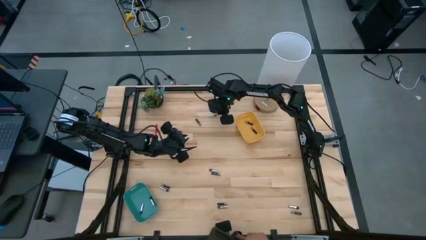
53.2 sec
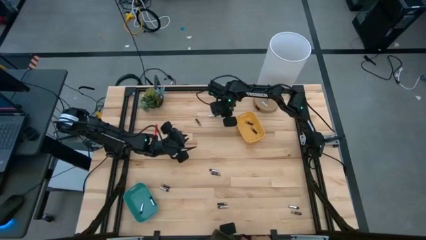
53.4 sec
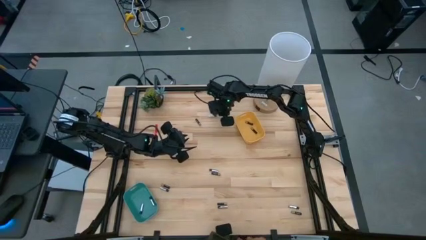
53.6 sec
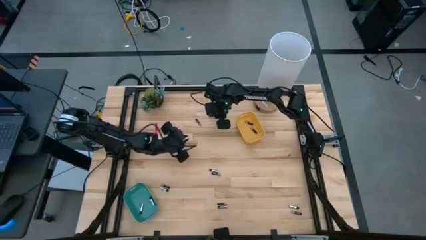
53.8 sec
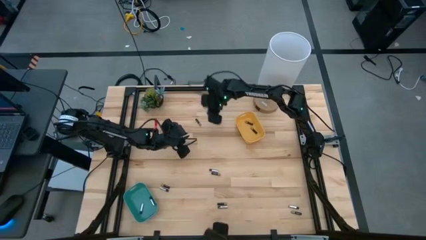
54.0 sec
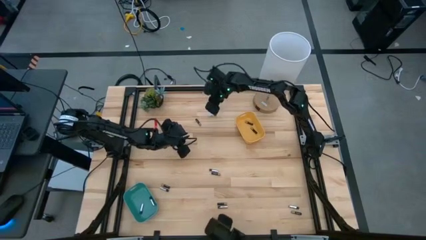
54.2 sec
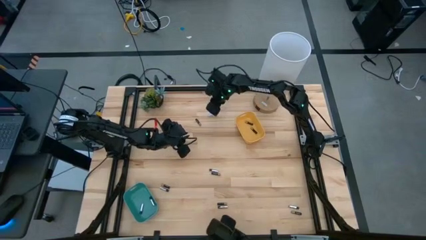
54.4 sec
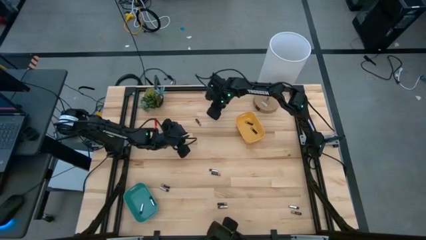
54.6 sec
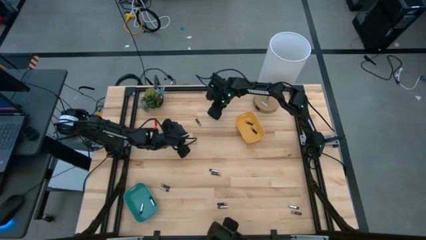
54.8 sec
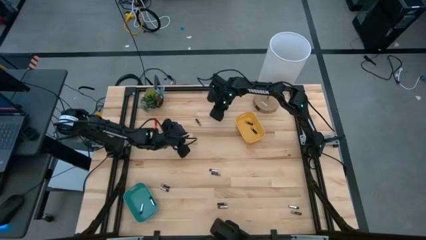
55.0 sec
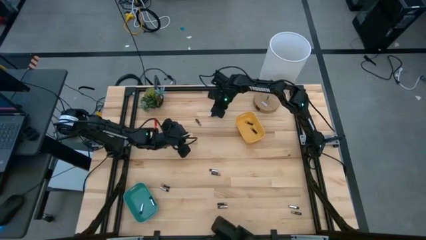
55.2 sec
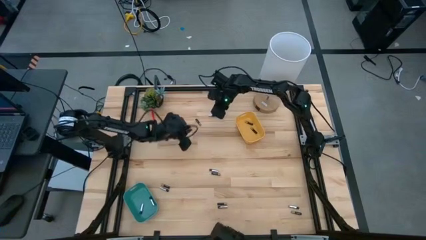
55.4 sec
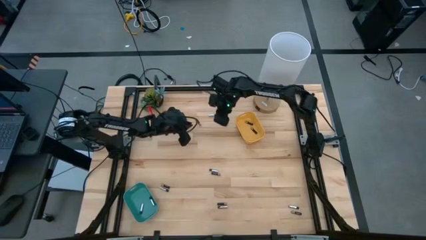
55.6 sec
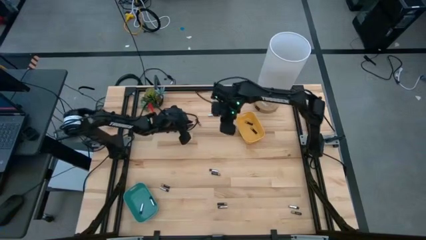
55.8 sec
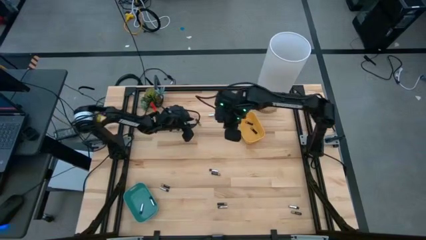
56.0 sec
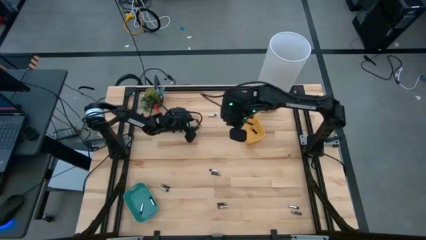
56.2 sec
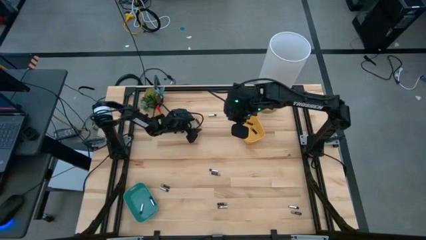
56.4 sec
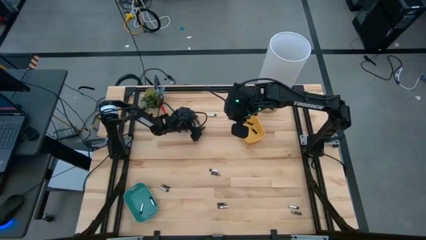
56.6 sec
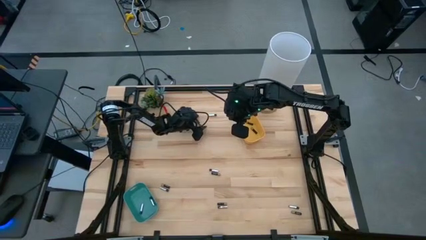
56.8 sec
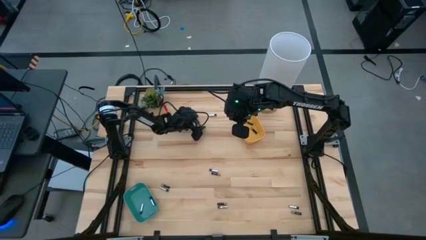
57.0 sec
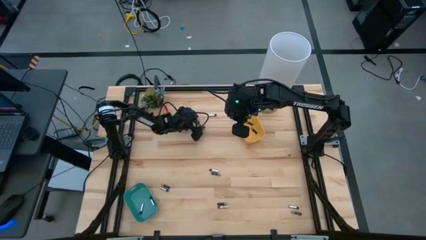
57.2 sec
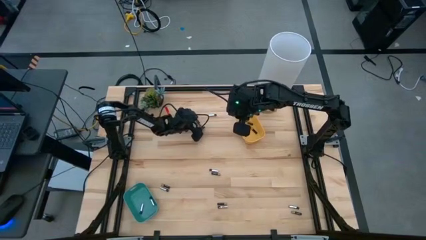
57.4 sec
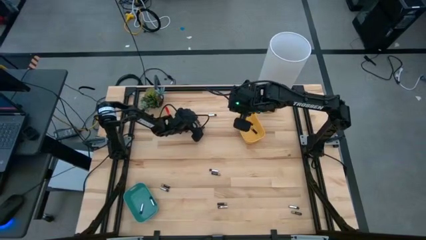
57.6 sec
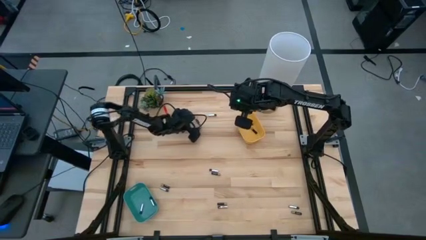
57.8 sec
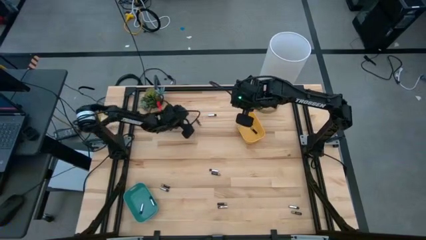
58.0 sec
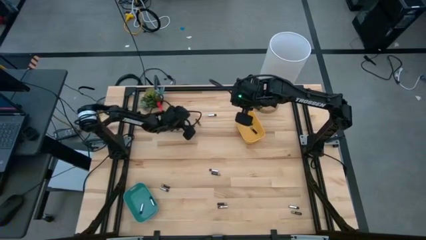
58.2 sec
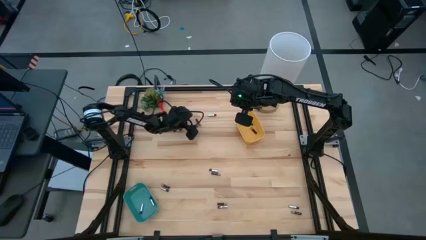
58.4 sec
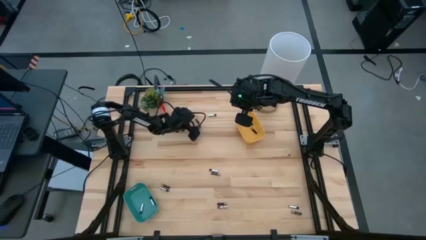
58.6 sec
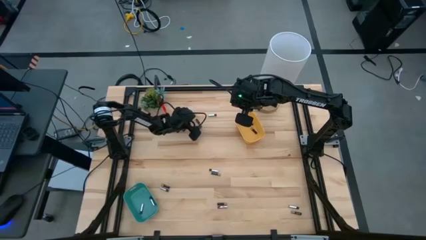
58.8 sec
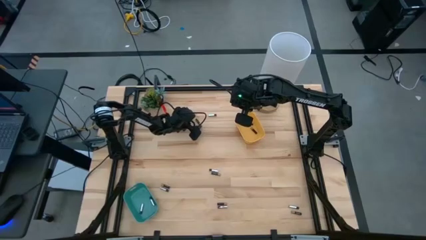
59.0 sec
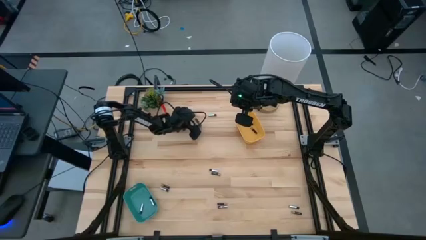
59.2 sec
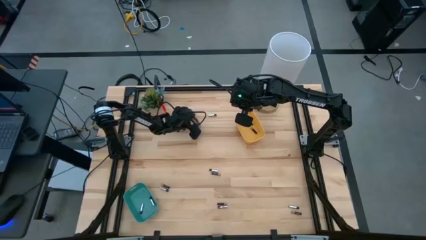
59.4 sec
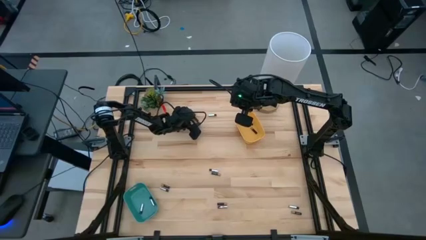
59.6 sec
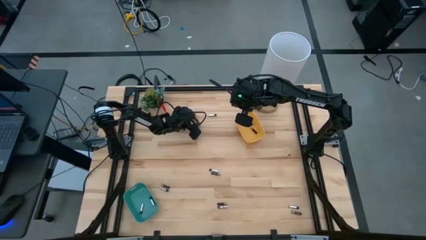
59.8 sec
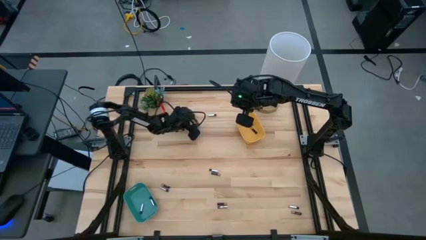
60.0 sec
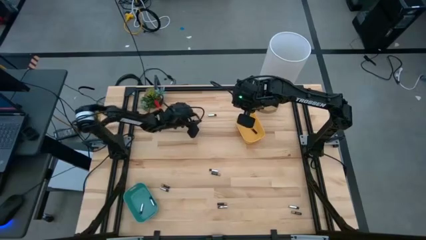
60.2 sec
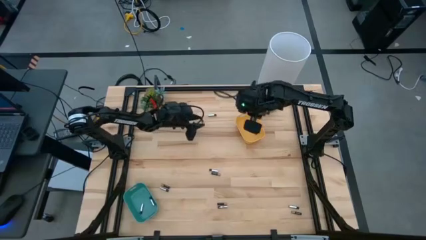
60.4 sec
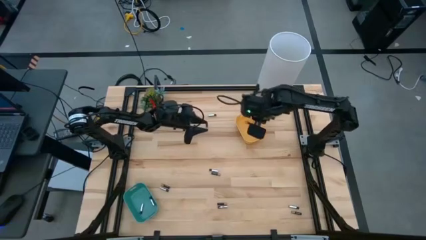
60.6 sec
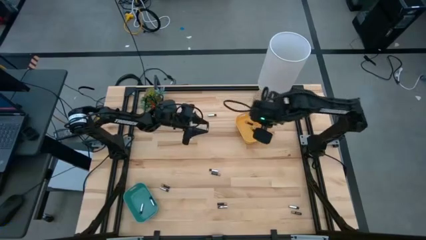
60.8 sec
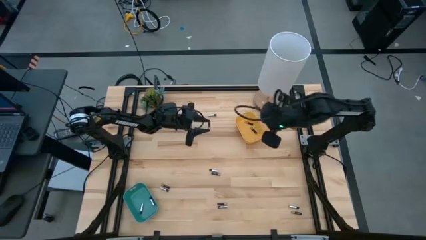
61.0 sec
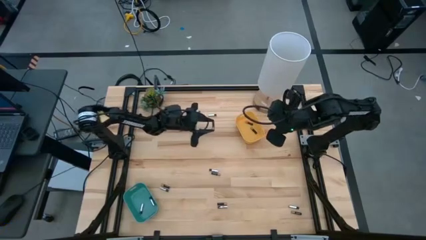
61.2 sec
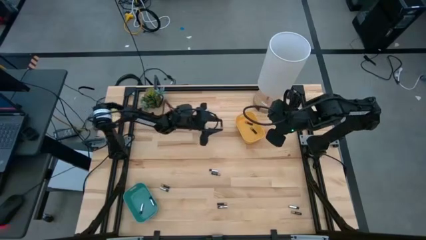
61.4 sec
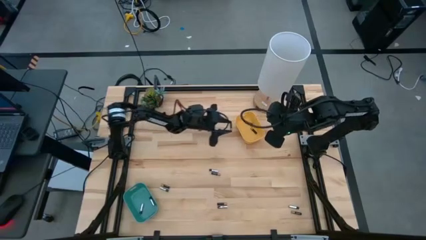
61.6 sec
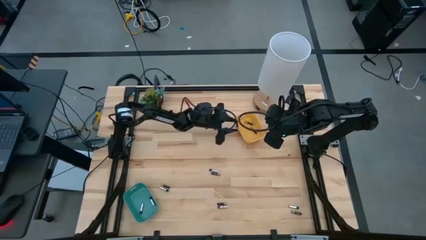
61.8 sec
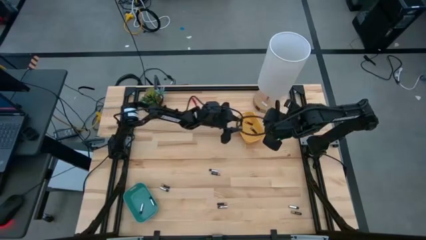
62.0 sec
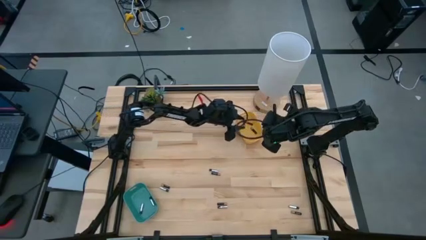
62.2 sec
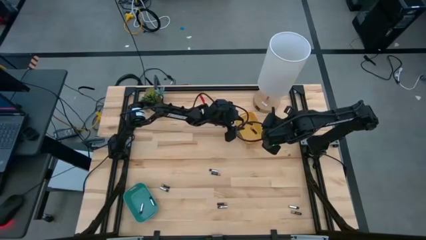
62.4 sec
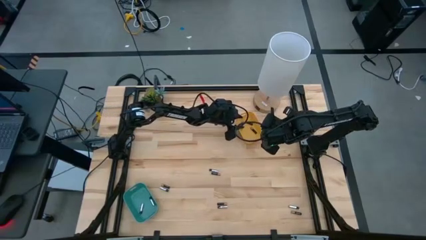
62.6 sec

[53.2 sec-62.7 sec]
Task: Sort batteries
Put the black battery into the yellow bin

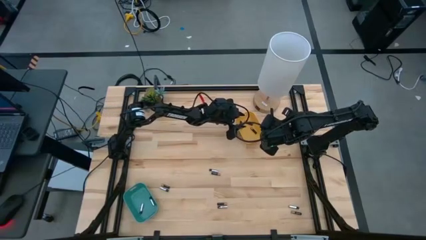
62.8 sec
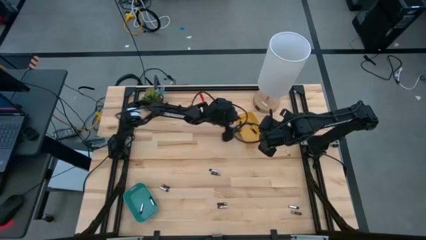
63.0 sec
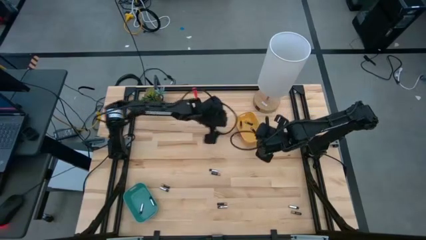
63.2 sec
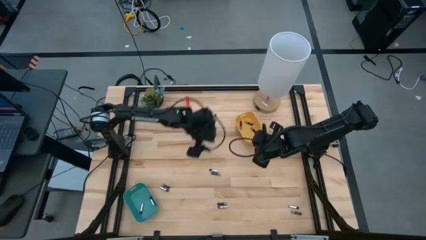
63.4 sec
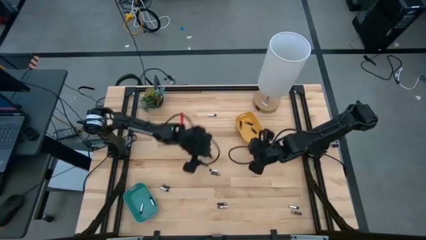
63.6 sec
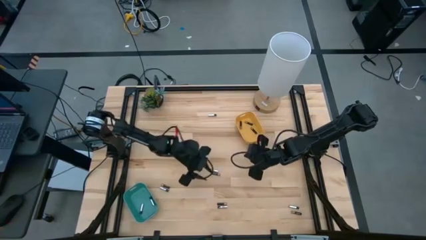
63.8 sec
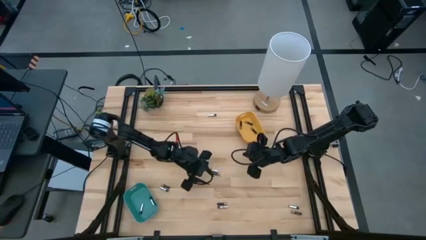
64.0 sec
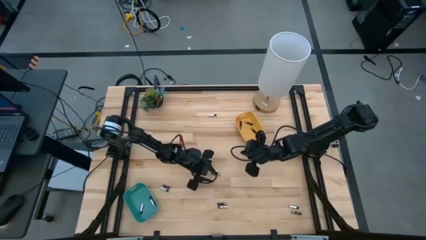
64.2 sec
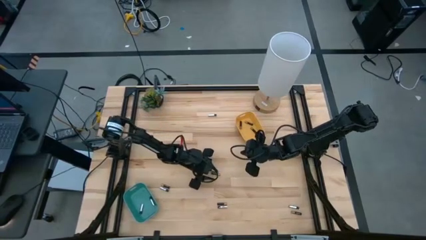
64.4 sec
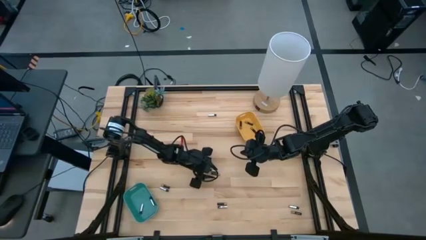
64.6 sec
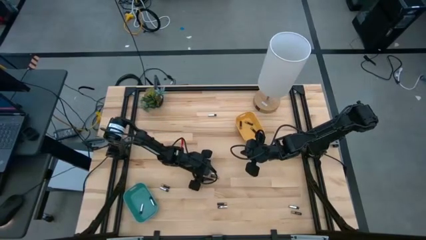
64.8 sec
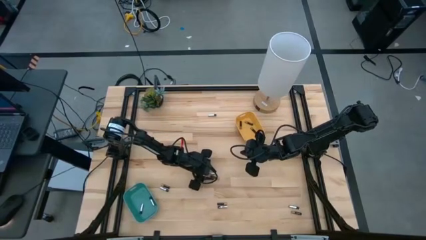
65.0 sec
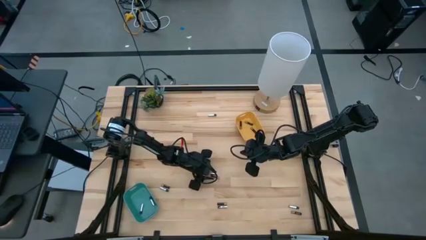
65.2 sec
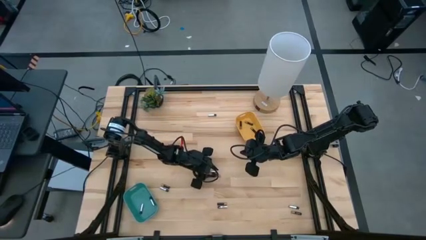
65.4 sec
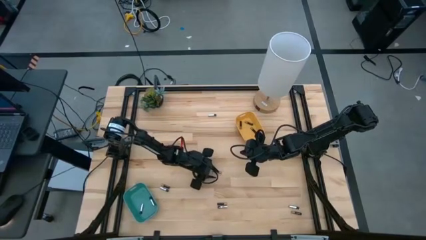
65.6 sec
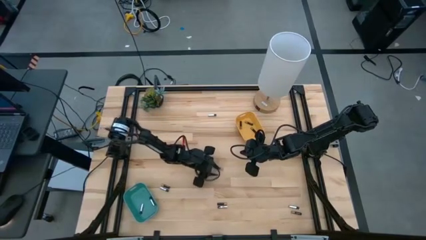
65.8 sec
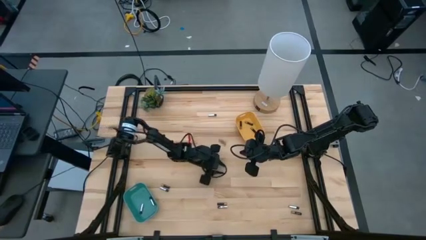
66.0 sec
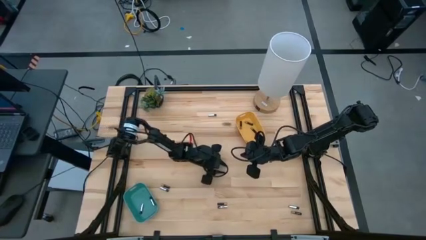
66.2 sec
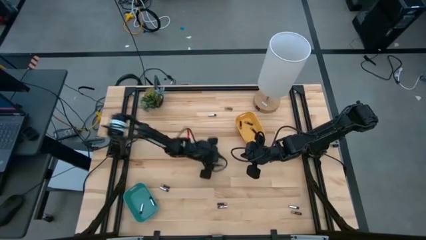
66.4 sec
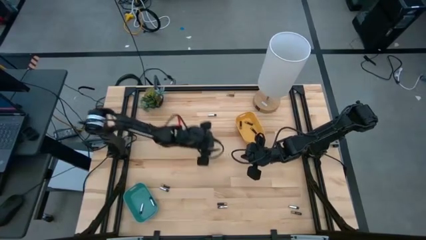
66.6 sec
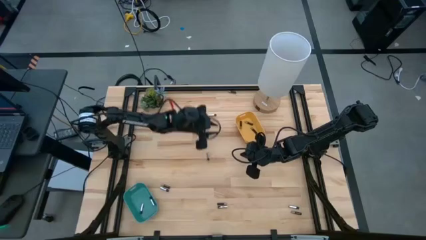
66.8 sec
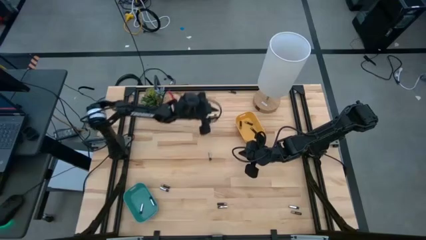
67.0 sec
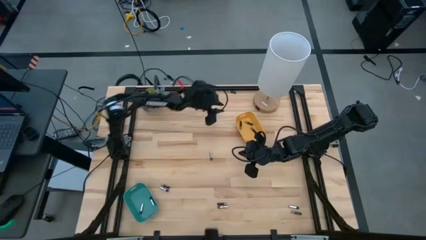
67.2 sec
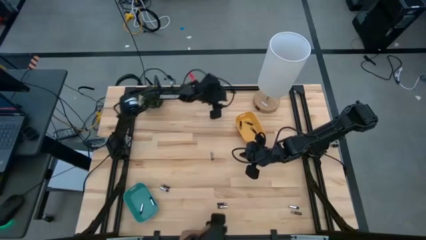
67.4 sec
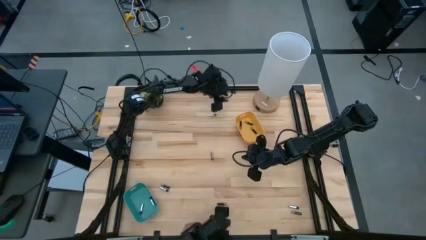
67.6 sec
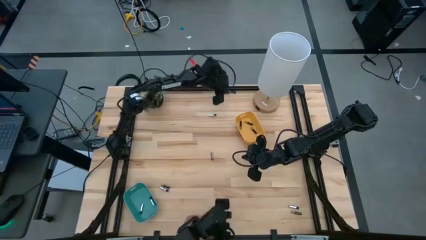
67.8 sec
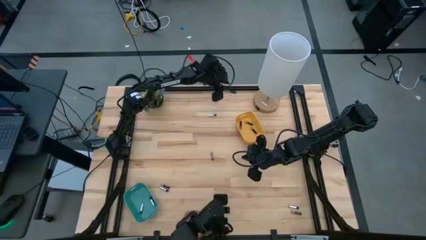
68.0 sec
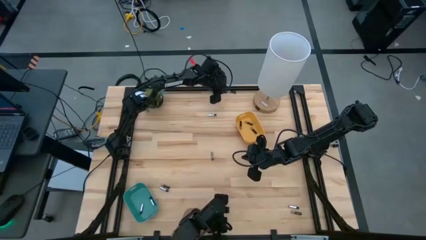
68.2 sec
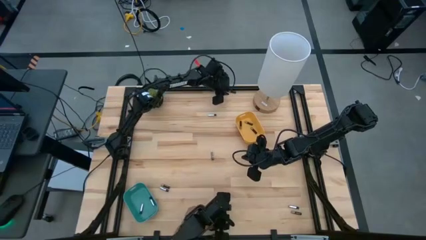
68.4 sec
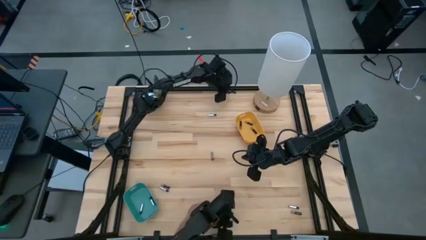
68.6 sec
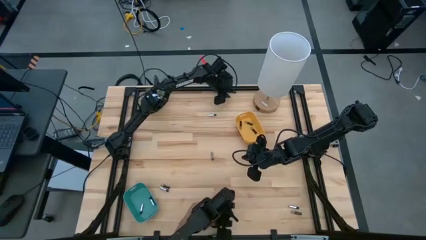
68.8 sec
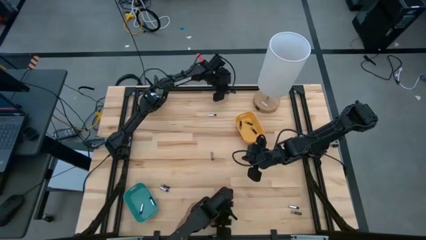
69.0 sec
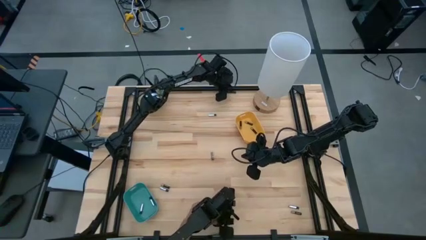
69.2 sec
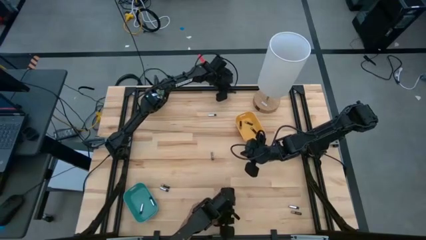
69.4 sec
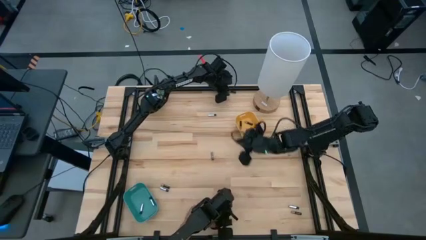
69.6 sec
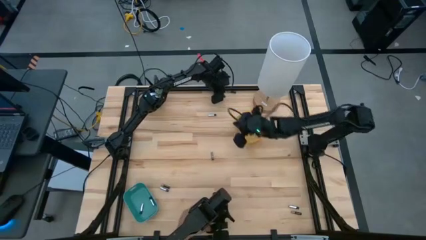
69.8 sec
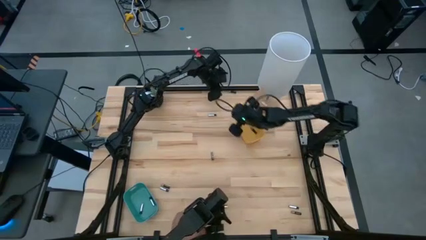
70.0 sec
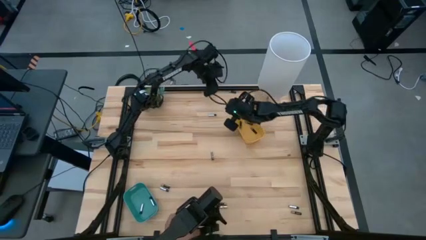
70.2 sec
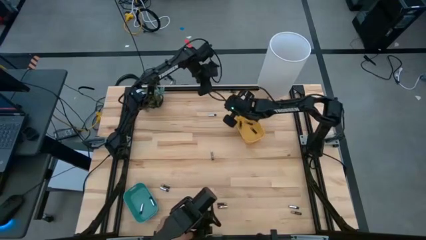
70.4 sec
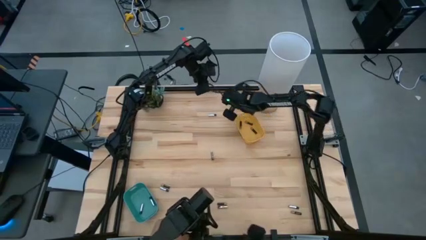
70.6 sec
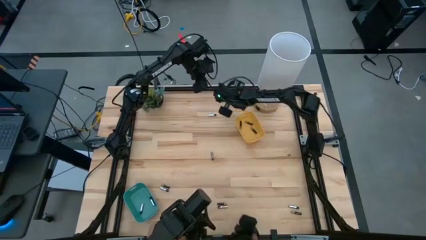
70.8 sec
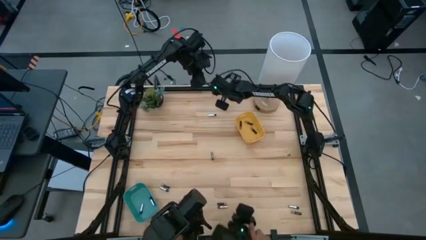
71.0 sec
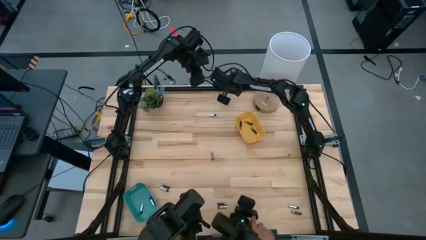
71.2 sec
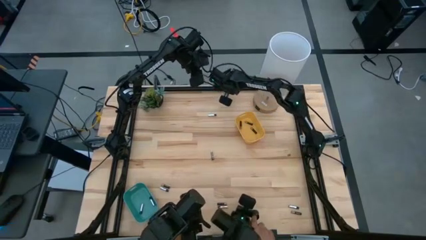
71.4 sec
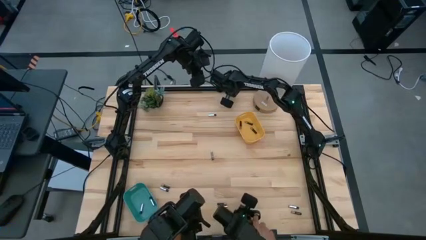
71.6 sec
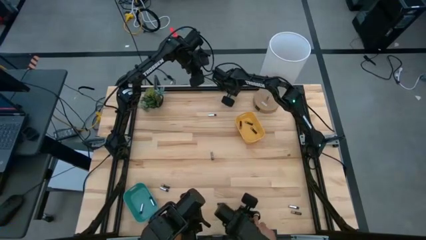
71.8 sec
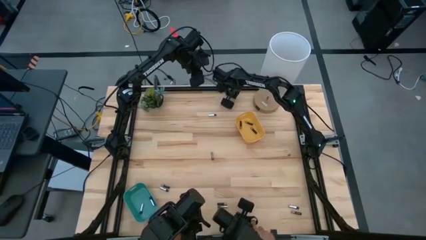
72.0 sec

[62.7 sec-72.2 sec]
Put the black battery into the yellow bin
